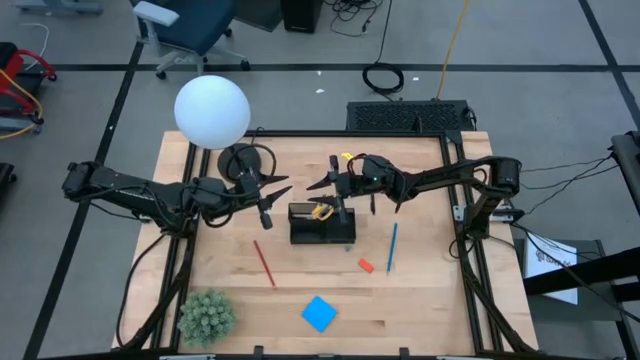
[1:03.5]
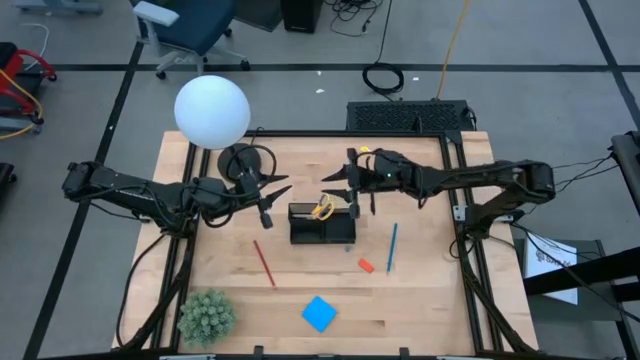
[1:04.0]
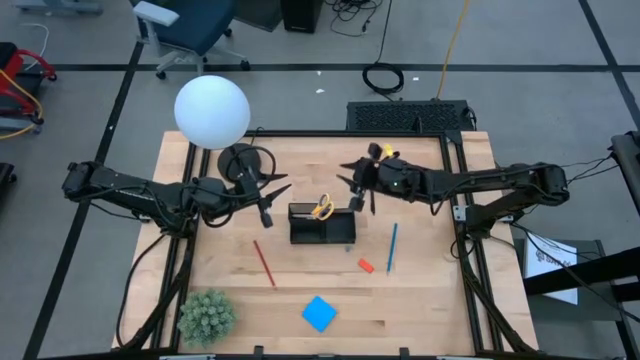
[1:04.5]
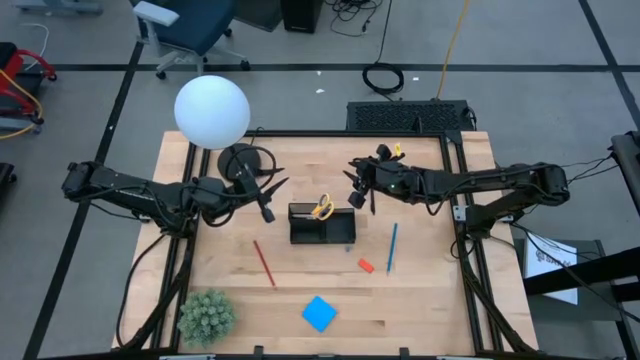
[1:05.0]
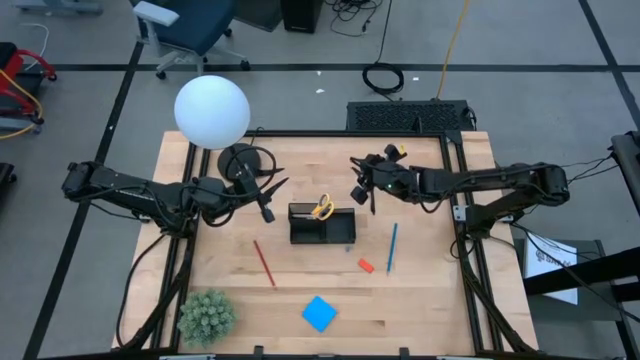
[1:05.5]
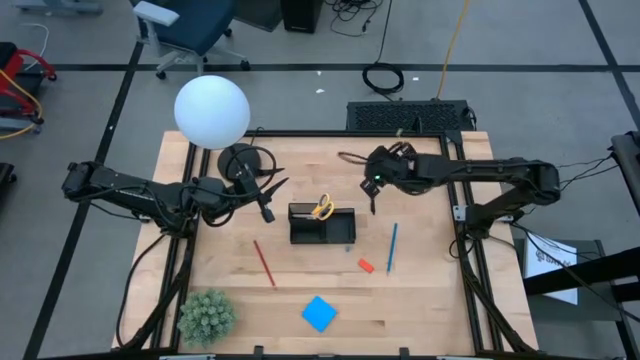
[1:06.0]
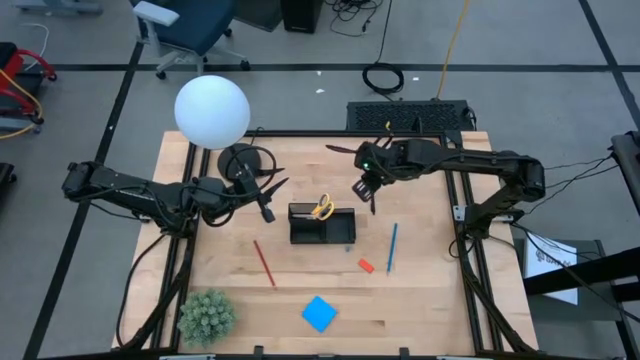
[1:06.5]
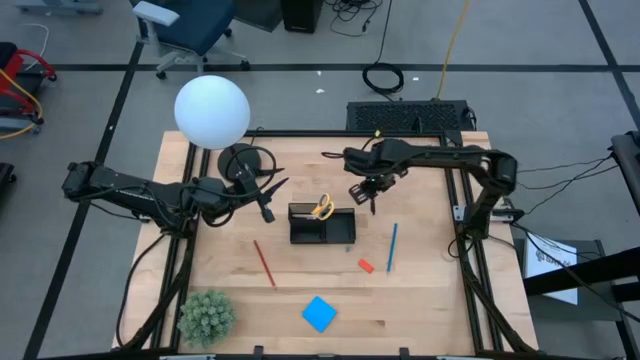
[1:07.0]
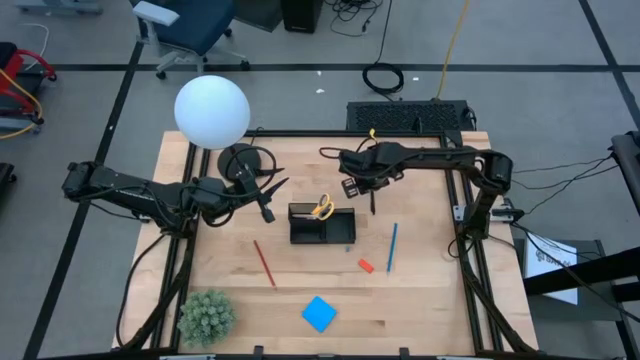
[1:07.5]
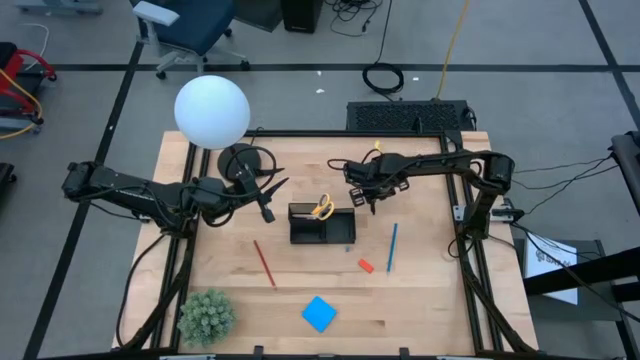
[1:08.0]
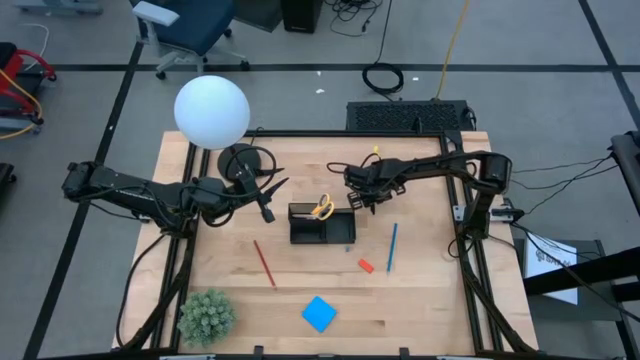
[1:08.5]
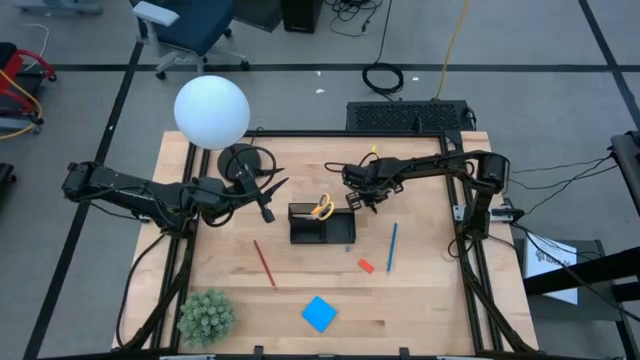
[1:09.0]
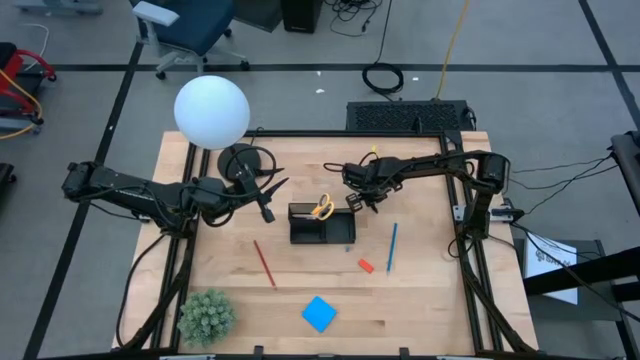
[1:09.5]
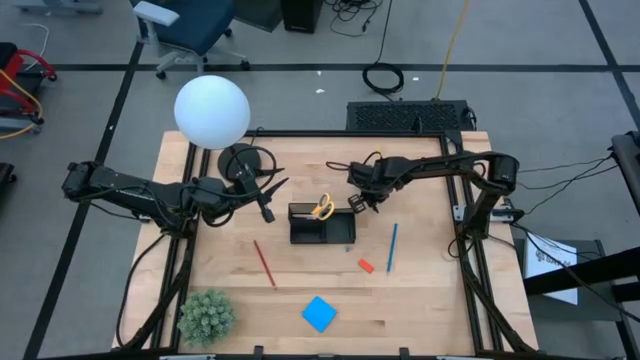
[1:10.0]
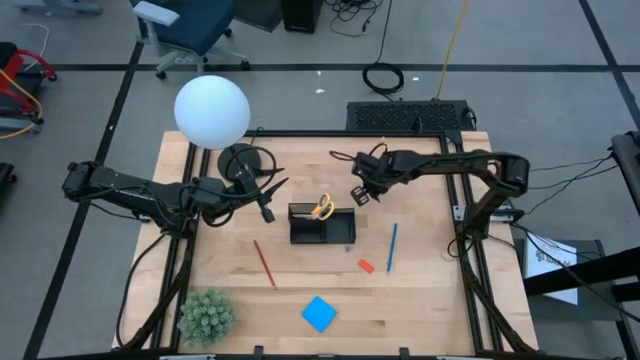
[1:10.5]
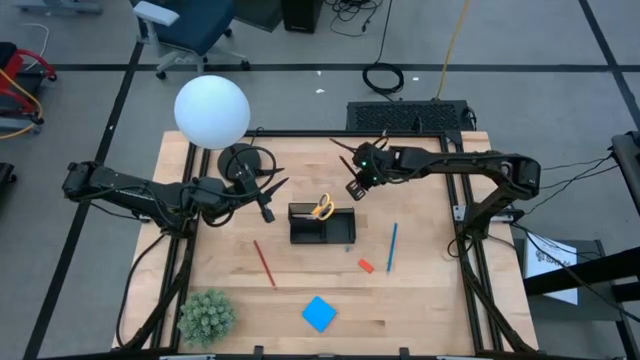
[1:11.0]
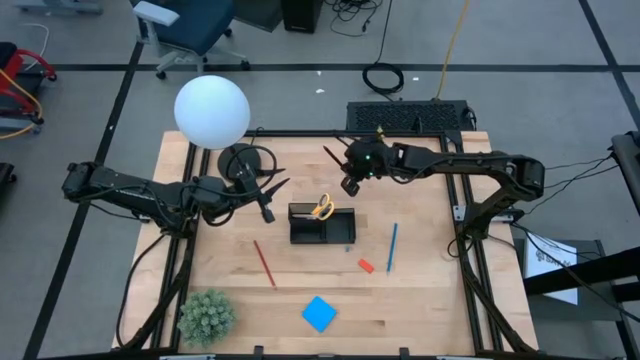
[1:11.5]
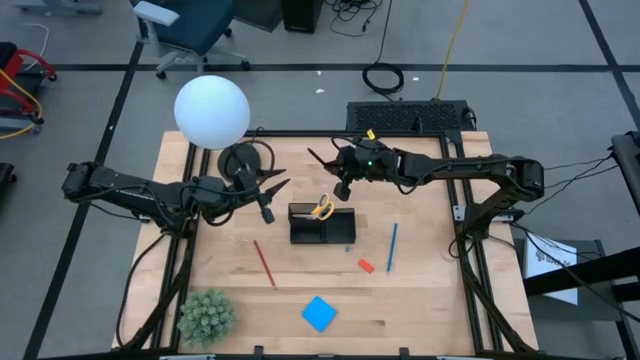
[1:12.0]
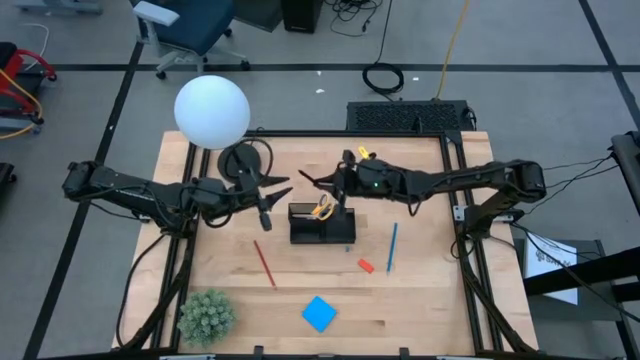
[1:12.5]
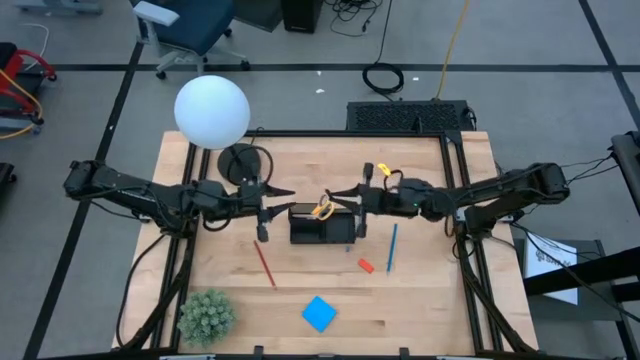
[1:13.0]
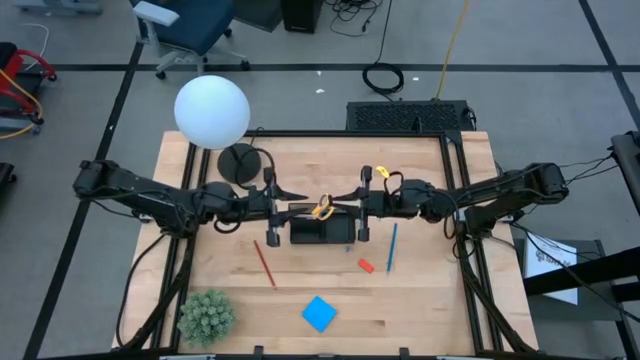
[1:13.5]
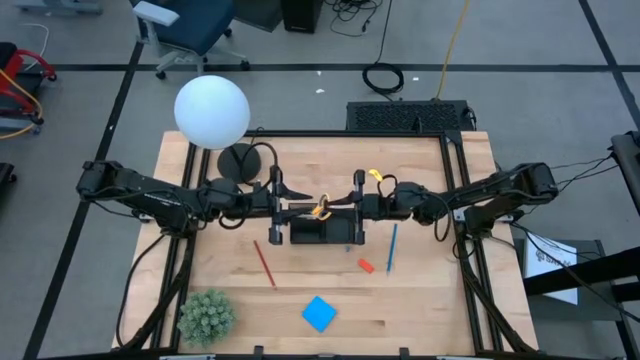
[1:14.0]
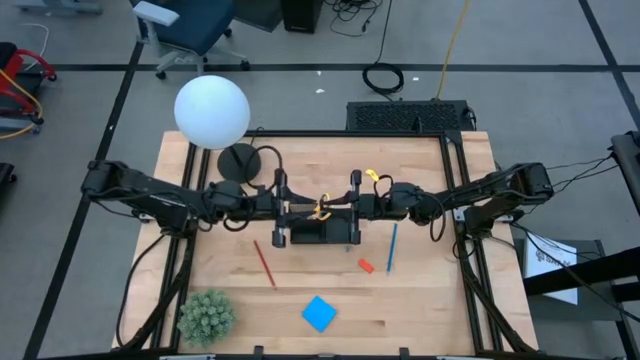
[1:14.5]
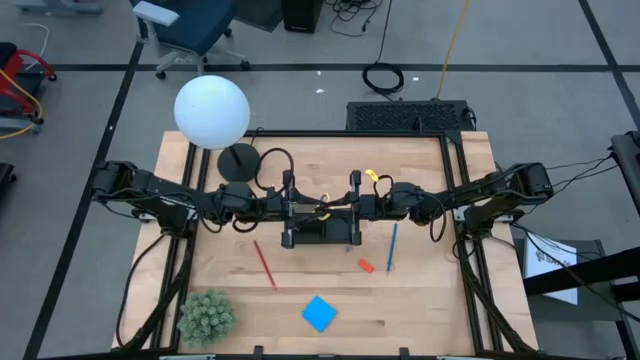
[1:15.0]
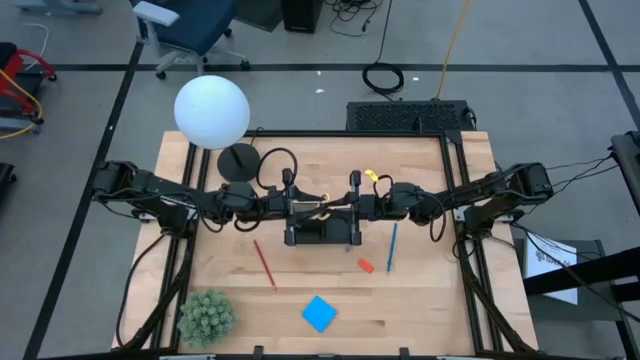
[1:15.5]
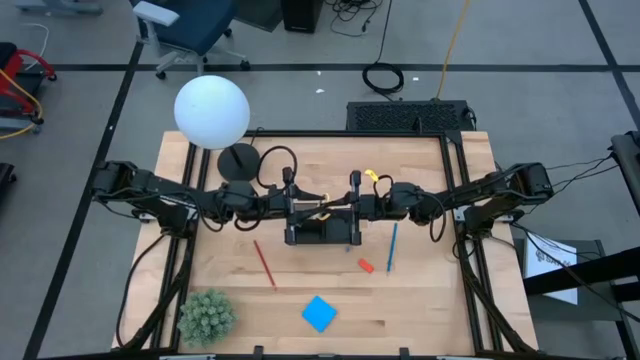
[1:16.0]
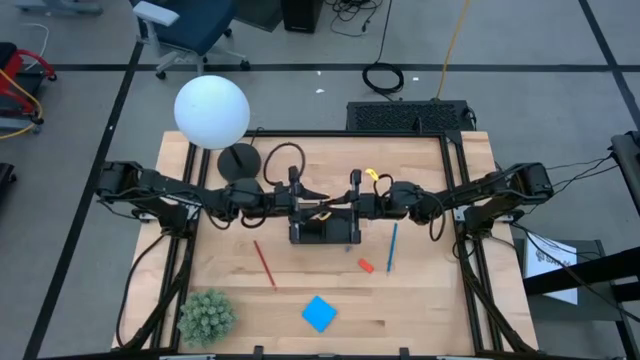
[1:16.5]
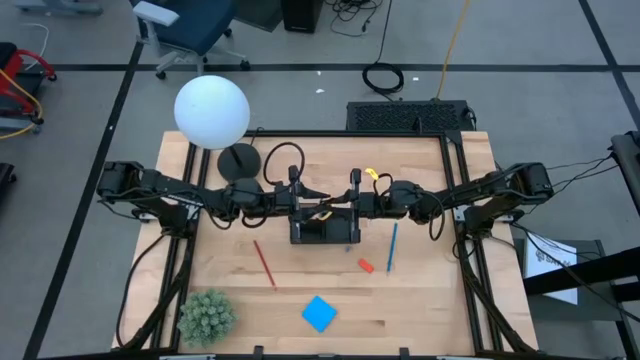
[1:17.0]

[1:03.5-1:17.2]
Task: Pick and place office supplies into organizer
Put the black pen into the desk organizer
